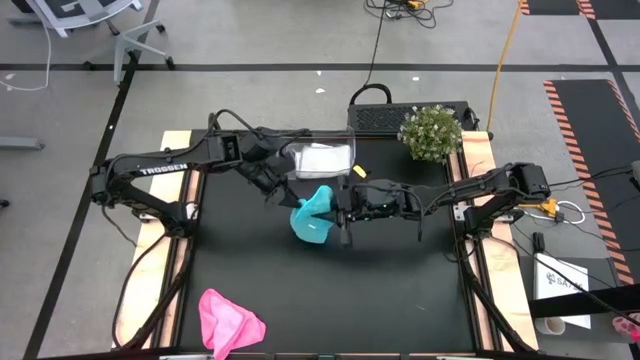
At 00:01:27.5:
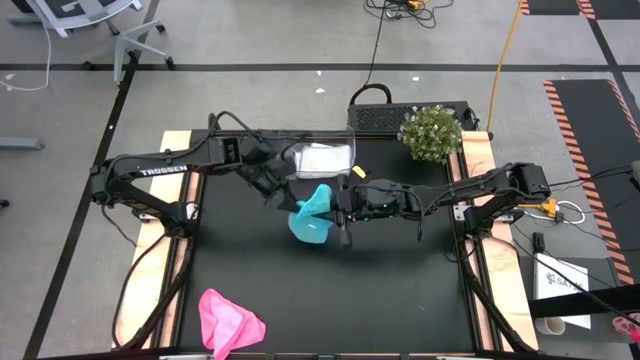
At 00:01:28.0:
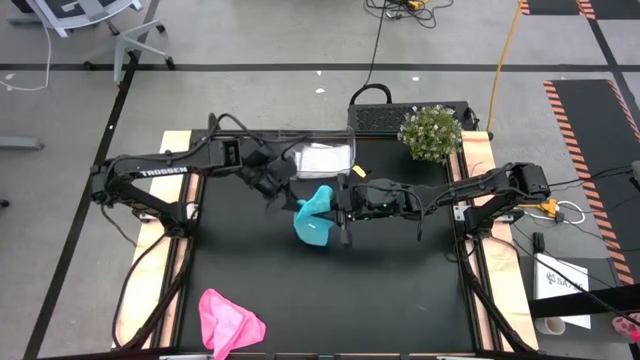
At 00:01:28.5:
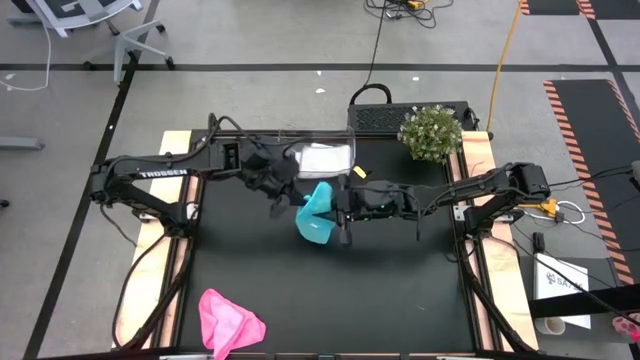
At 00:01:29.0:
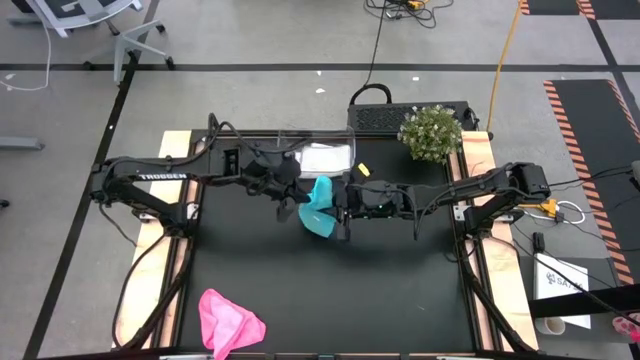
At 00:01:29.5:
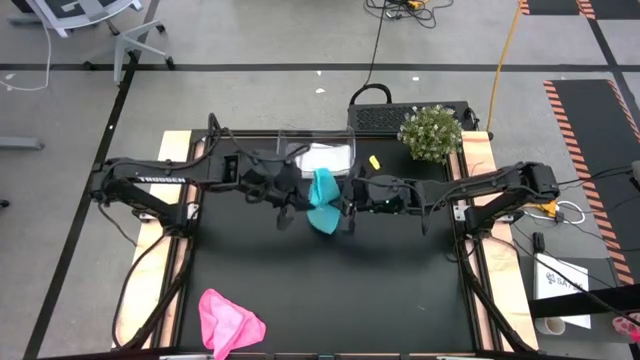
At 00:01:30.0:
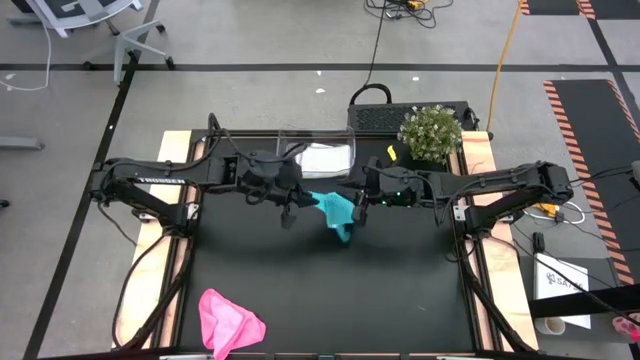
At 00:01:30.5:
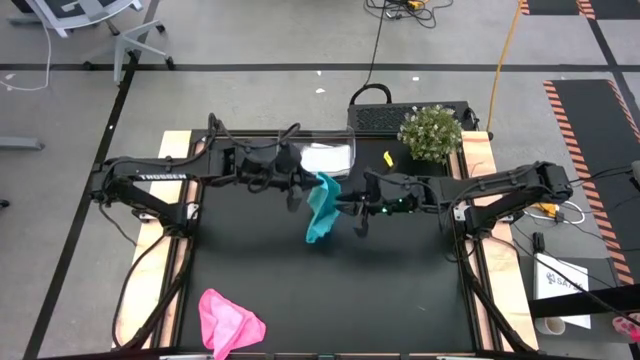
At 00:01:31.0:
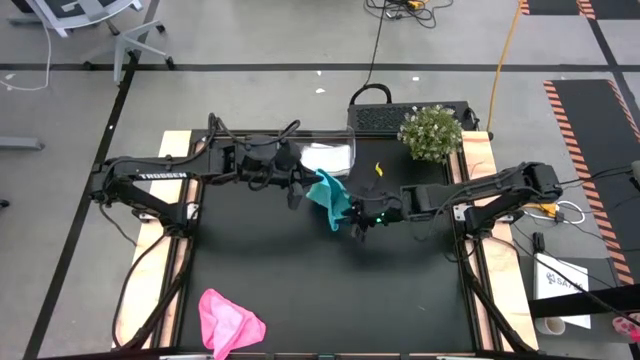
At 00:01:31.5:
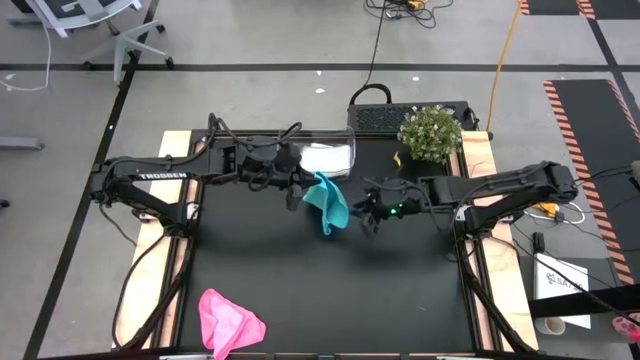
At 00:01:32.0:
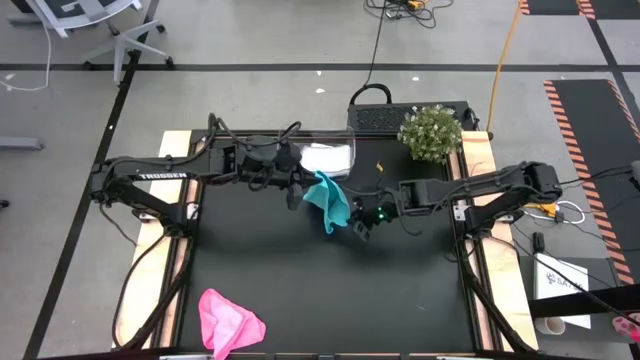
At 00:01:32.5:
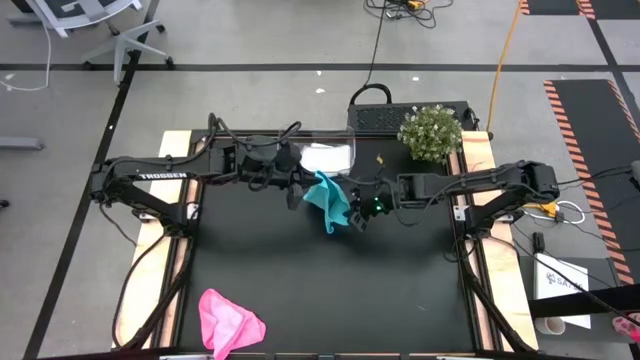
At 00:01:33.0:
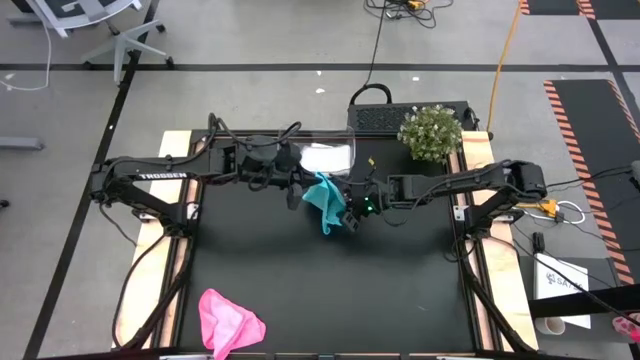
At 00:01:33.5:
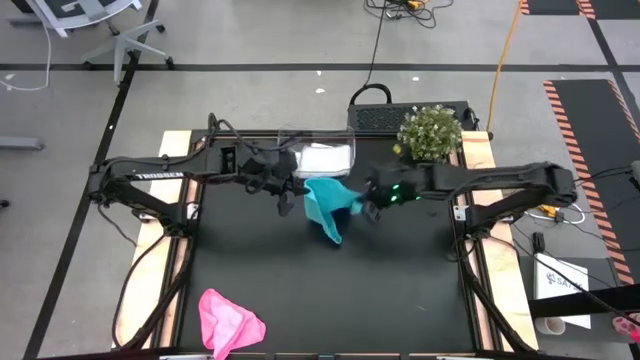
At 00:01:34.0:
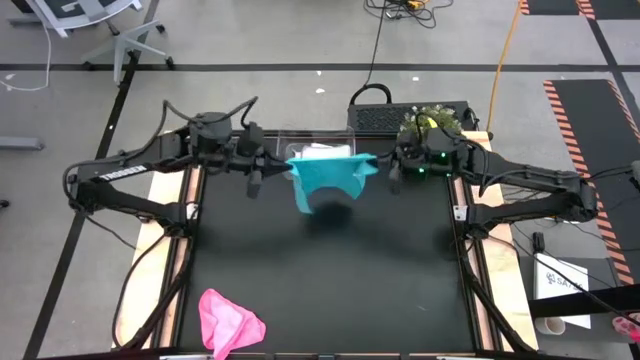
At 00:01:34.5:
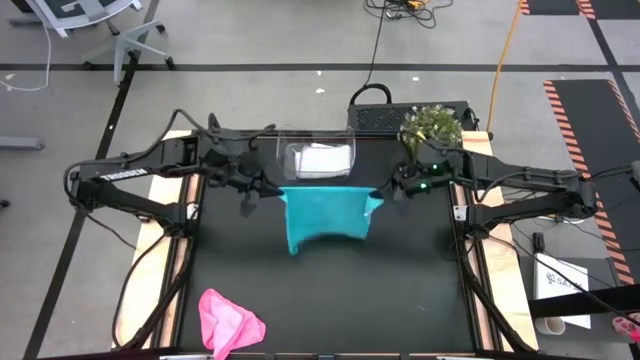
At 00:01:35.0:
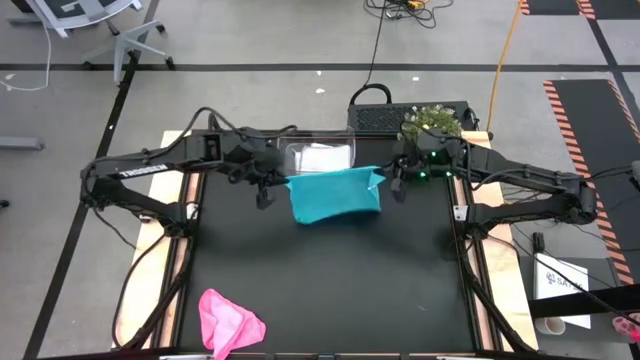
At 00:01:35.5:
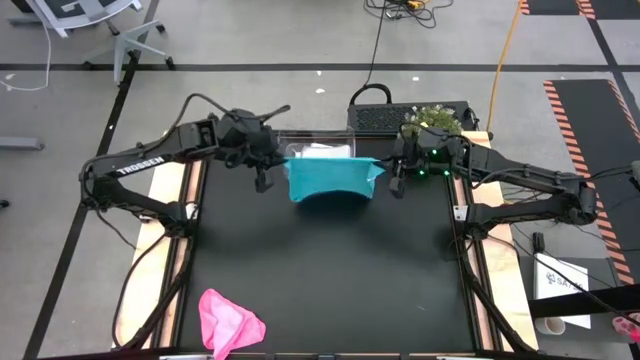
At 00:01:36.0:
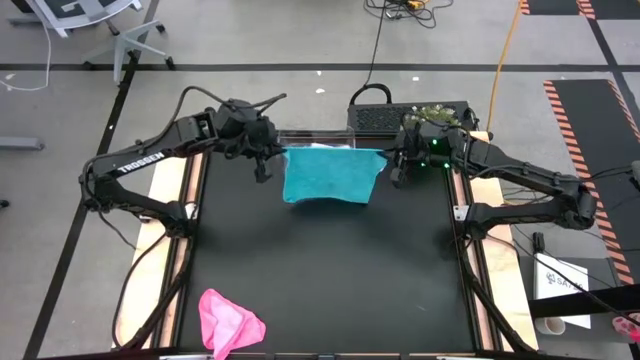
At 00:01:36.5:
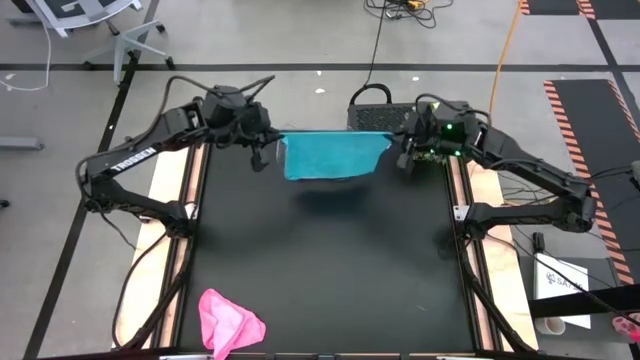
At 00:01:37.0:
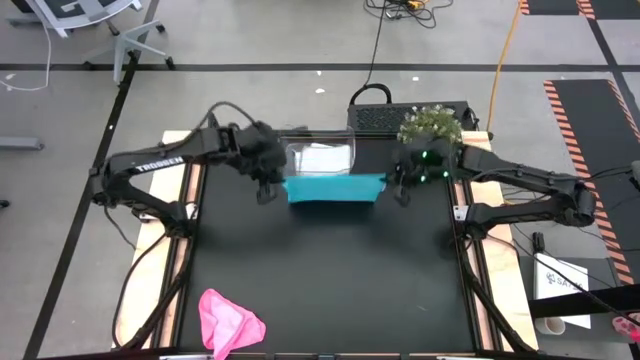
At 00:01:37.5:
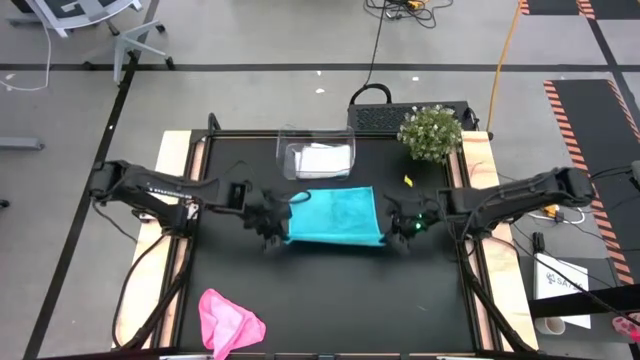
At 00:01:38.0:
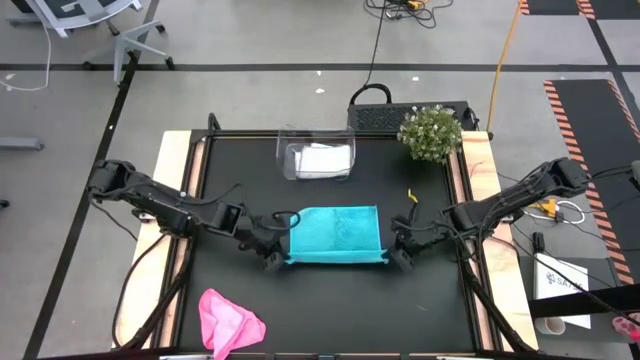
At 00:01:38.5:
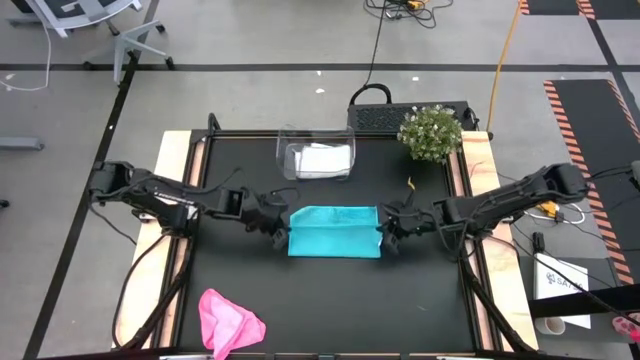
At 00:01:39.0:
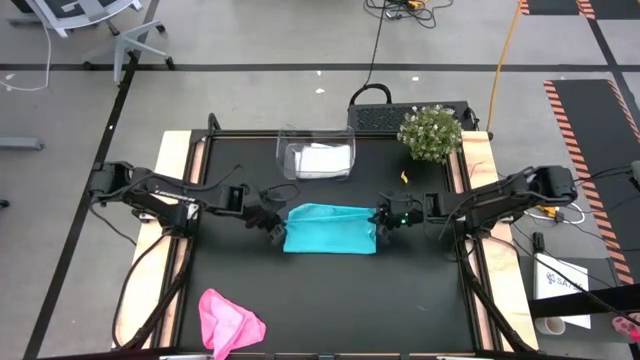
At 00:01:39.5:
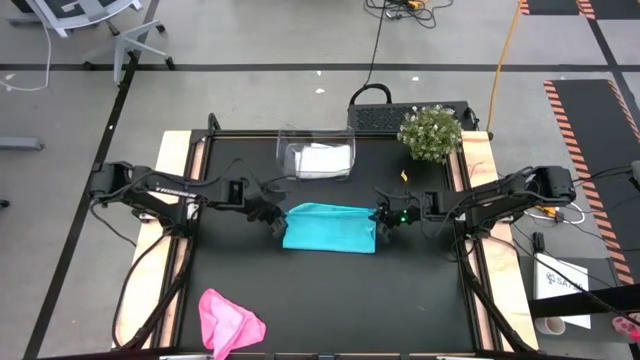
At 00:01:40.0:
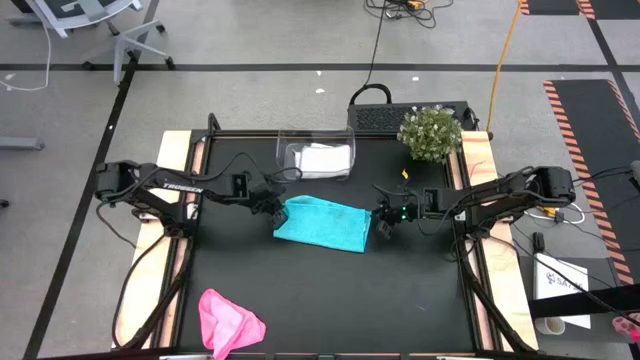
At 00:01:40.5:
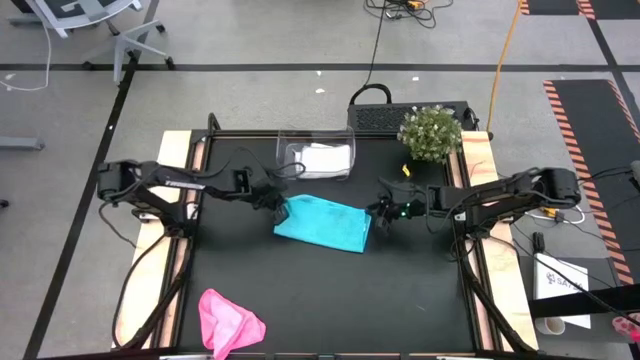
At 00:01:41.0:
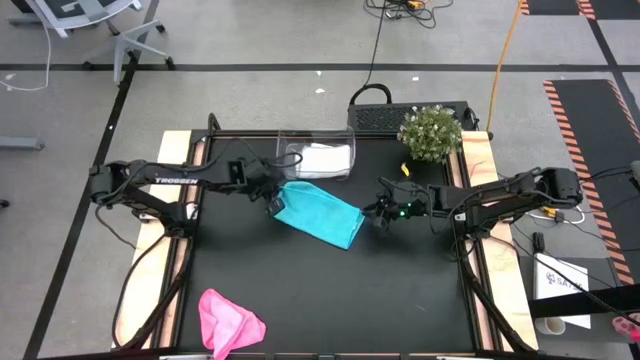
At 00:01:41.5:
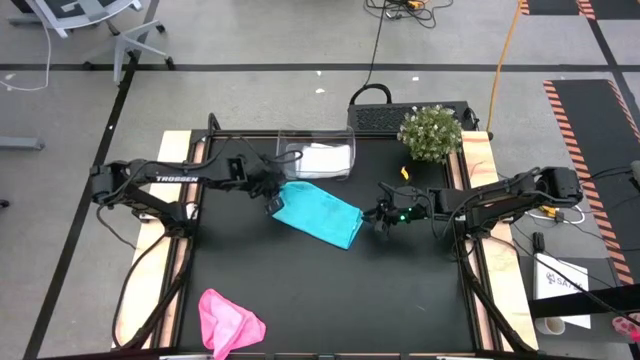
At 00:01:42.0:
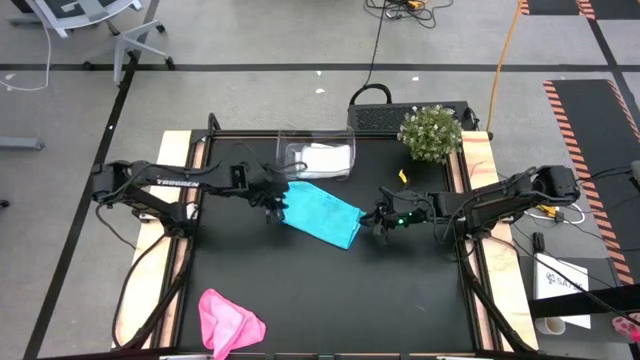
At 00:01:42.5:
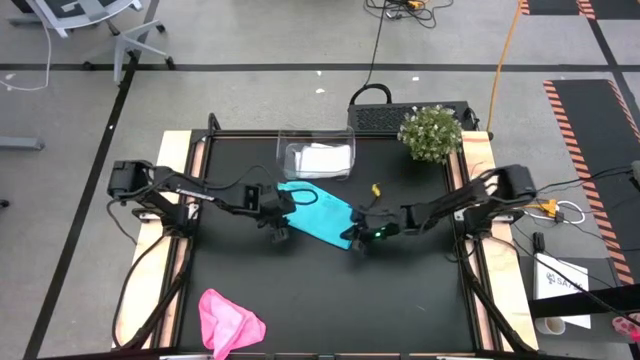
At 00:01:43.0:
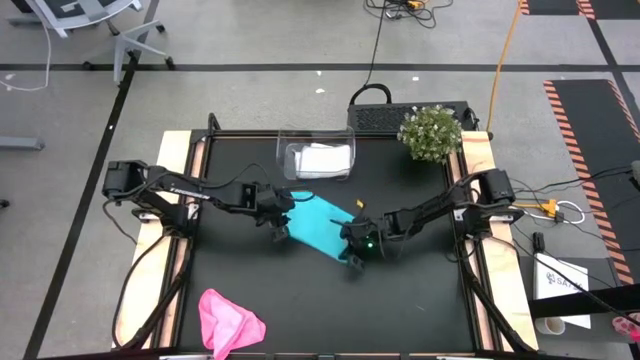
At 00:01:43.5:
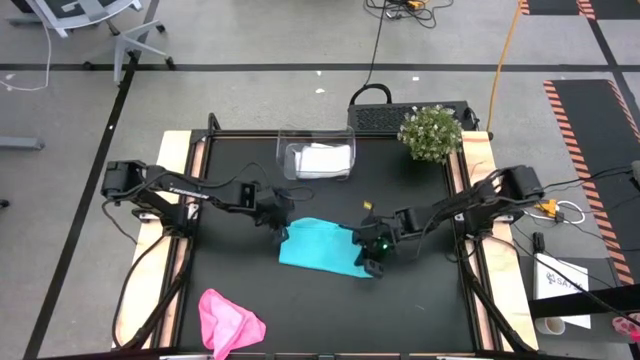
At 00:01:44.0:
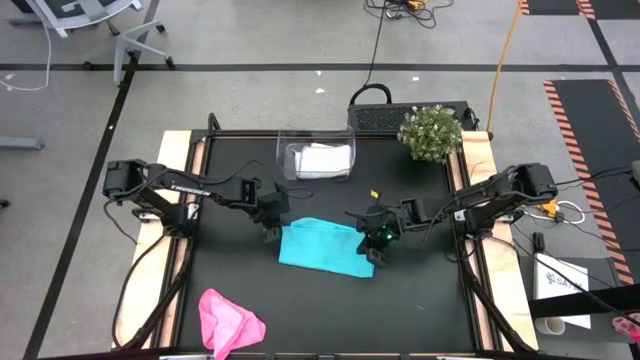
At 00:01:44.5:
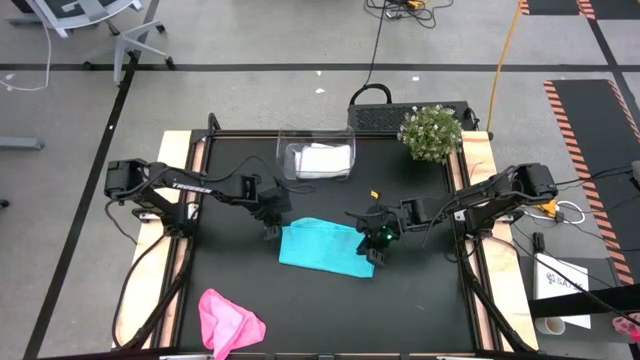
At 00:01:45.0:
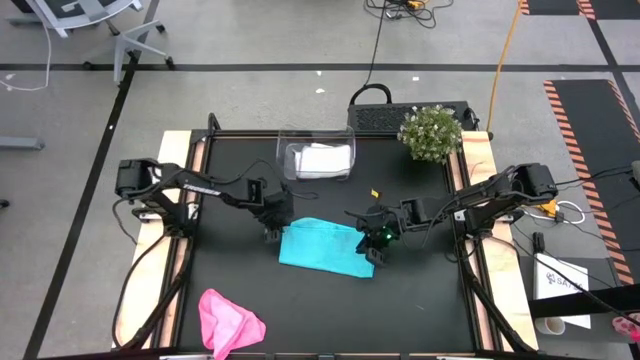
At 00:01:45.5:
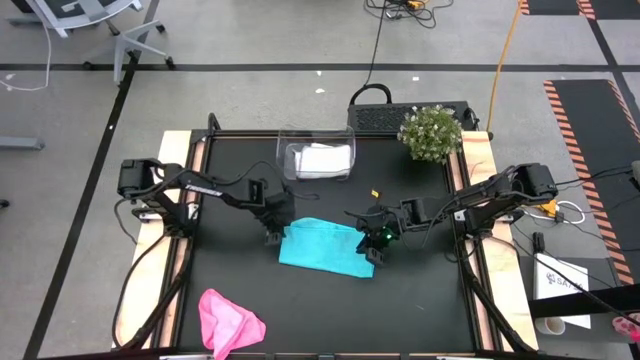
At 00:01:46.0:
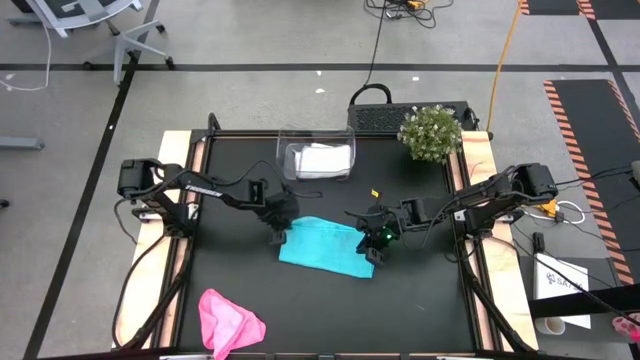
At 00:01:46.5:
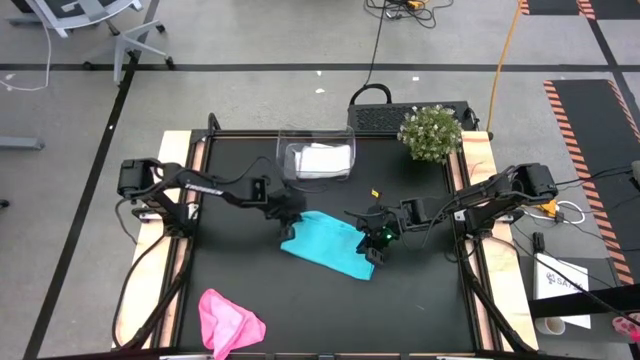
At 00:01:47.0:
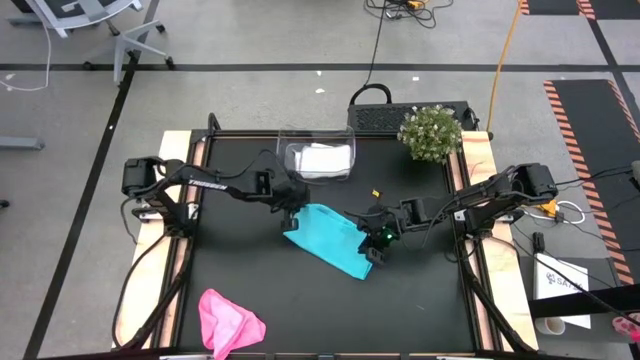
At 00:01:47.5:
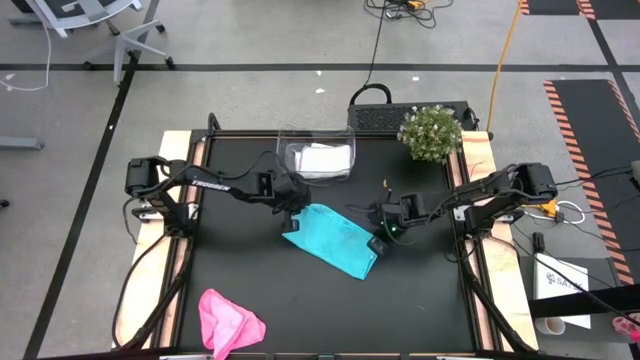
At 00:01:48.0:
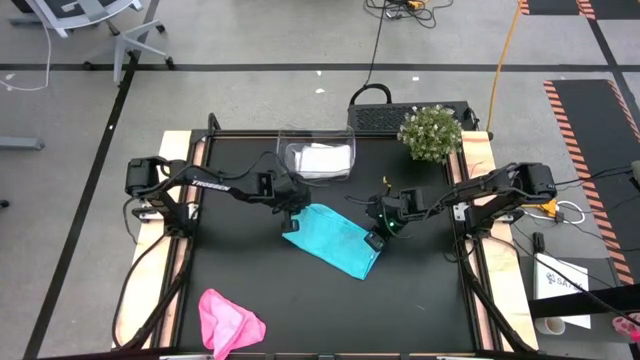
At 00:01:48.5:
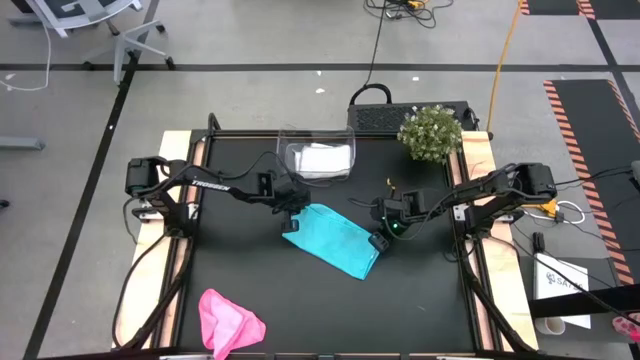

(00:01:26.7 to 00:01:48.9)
Task: Fold microfiber towels
Fold the blue microfiber towel
